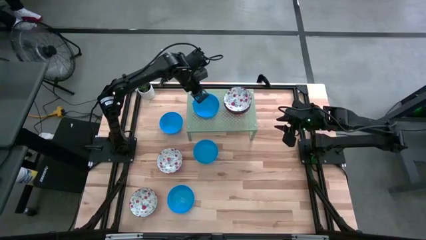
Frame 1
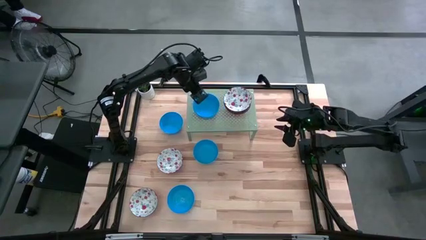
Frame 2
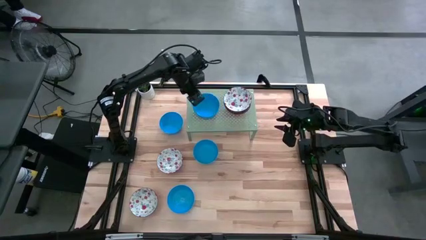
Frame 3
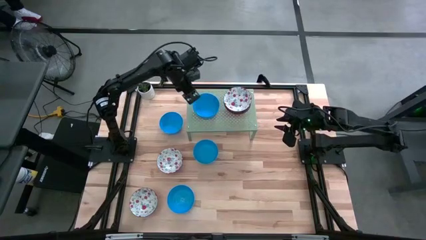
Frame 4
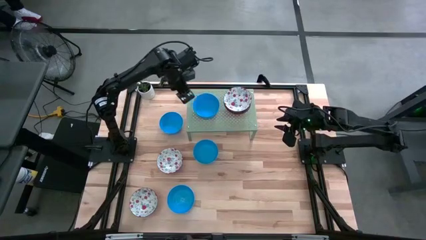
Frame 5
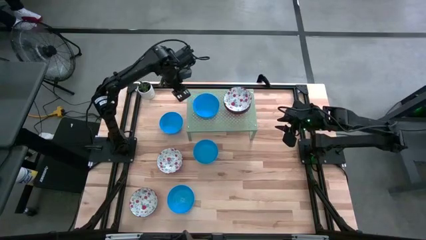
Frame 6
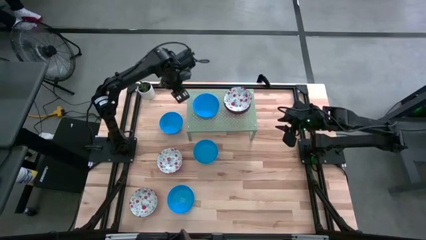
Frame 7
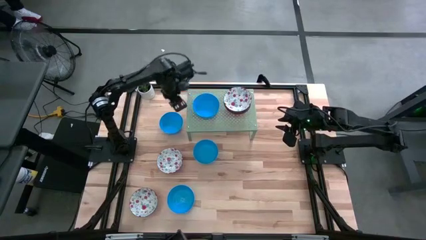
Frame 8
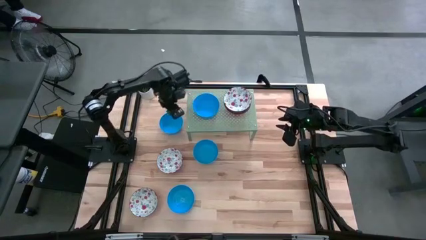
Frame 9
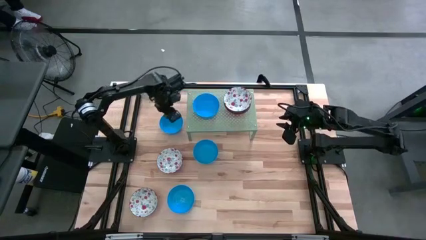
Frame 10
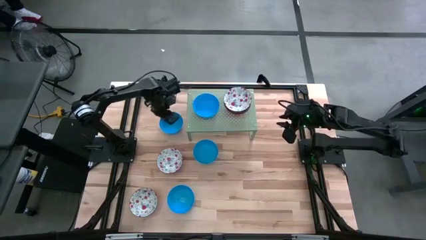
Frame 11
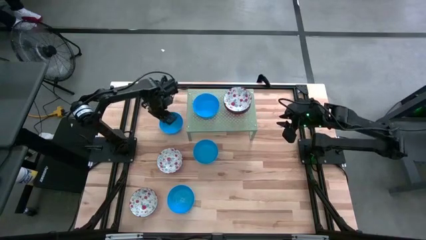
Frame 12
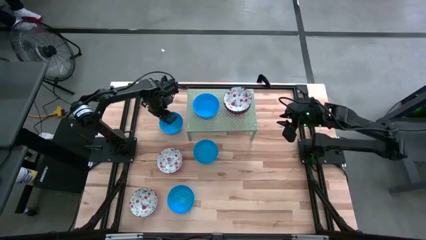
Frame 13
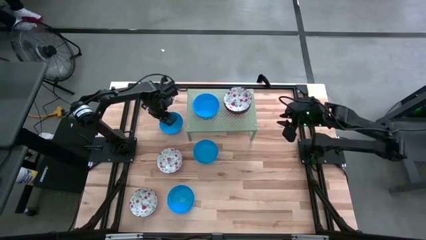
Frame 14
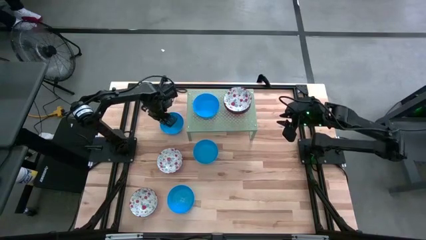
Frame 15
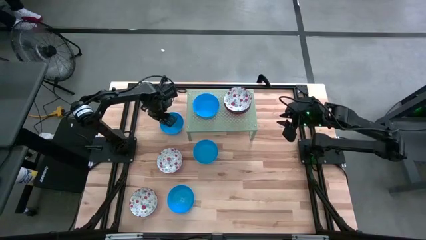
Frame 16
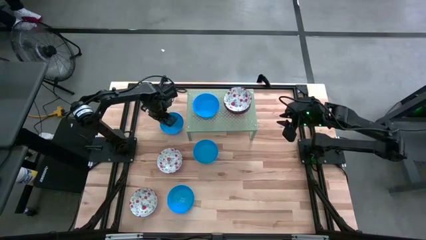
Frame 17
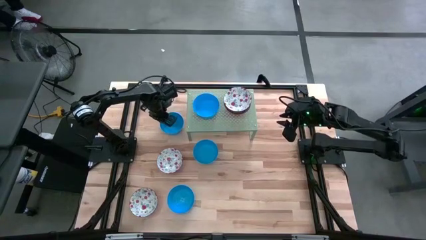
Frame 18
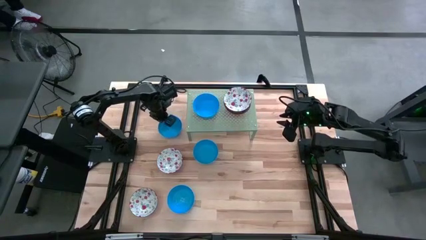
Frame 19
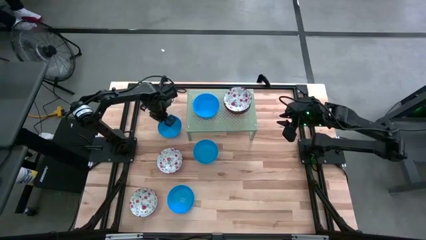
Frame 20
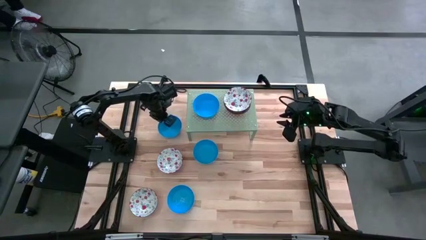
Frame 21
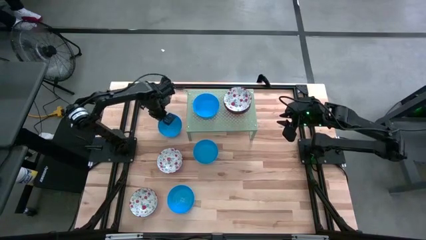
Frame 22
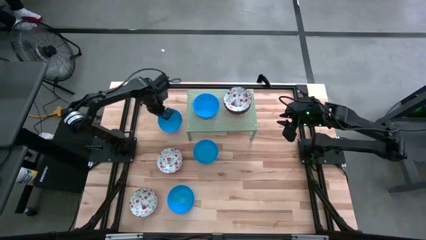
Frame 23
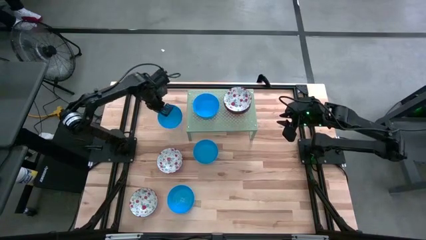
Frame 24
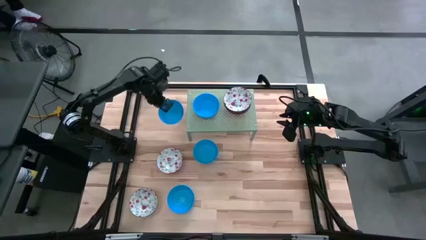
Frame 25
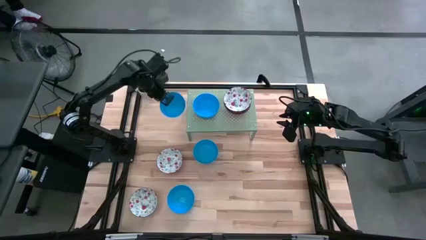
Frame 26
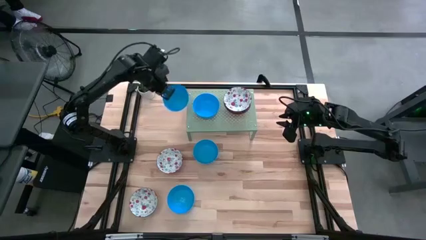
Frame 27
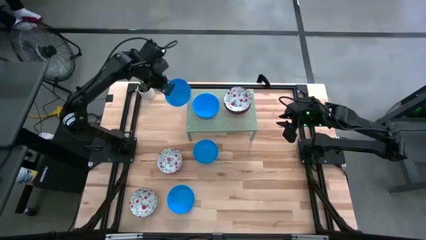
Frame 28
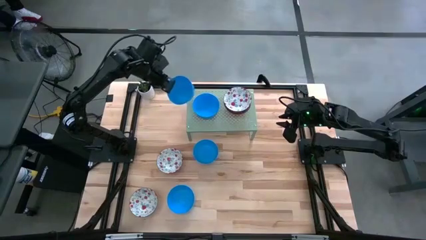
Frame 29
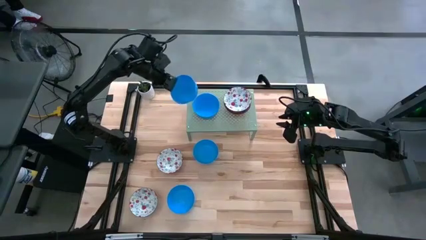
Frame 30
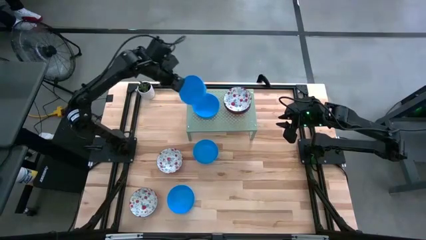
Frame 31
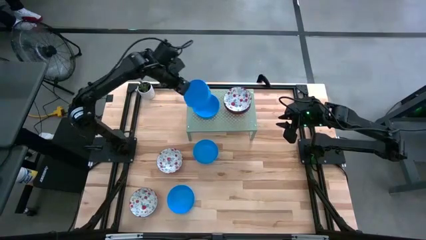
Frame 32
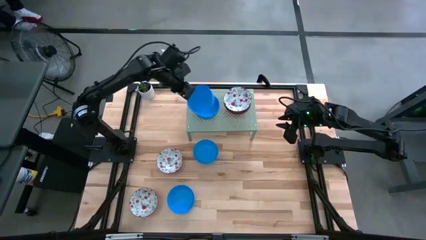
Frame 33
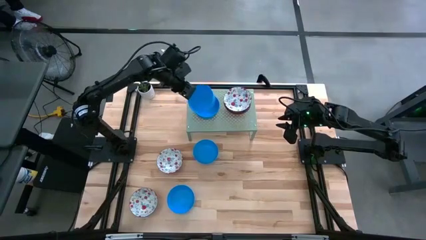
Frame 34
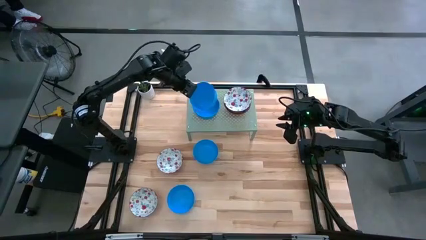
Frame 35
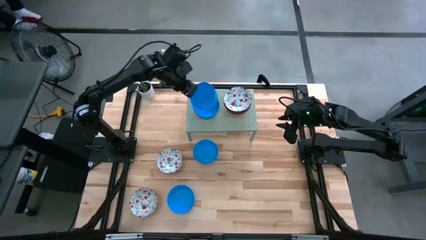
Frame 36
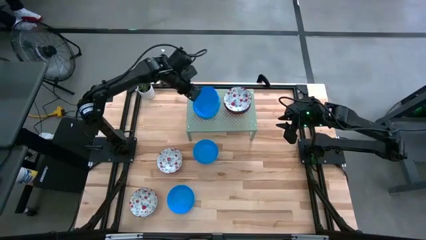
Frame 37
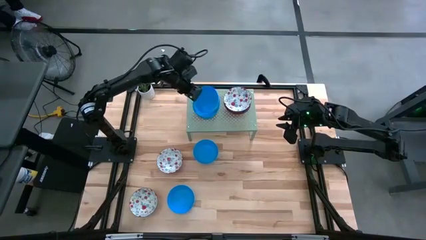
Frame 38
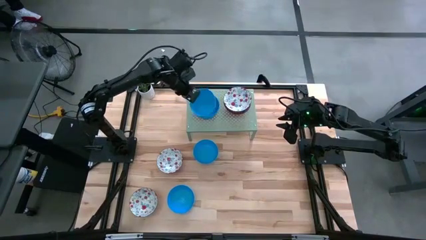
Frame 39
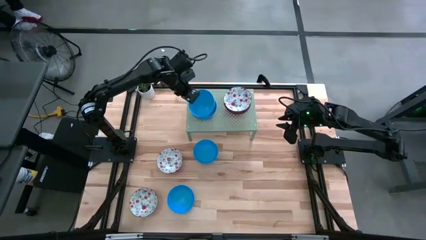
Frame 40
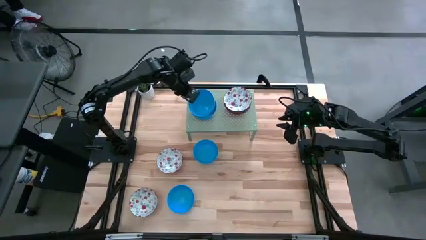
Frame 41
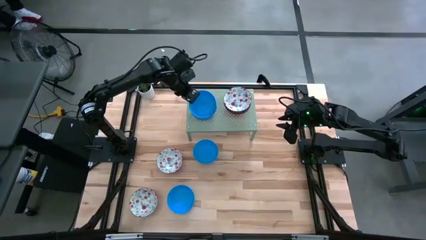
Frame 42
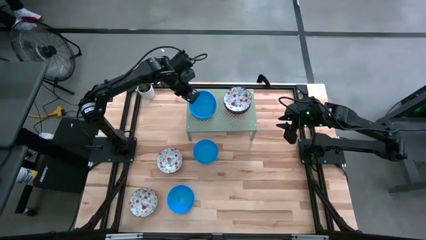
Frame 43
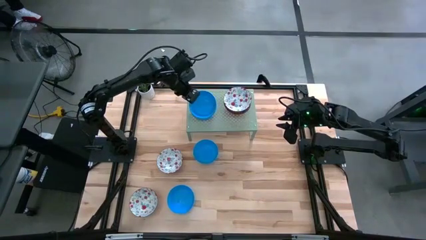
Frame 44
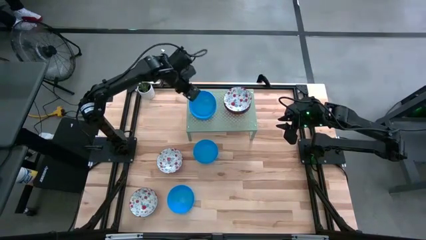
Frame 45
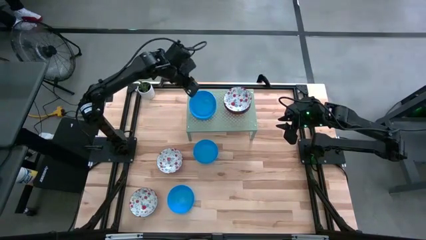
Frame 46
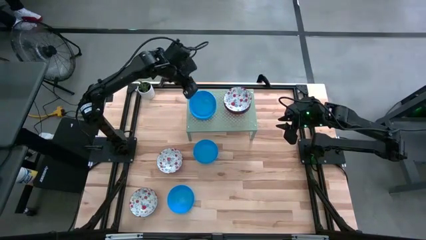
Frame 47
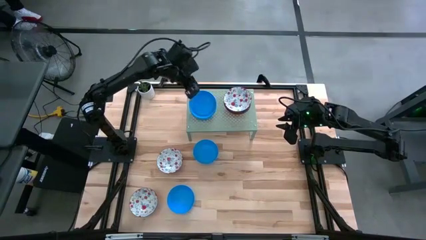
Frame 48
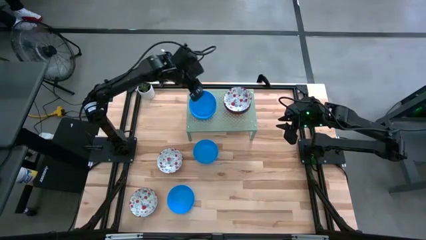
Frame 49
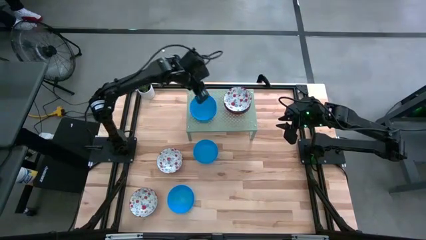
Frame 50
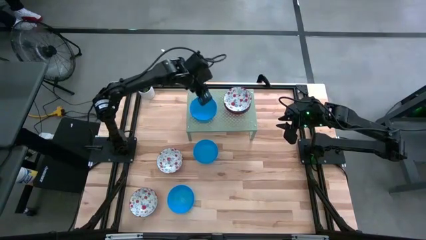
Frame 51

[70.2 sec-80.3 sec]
Task: Pick & Place Mini bowls
Stack the blue bowl on top of the blue bowls on the shelf

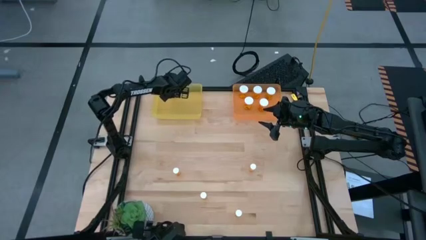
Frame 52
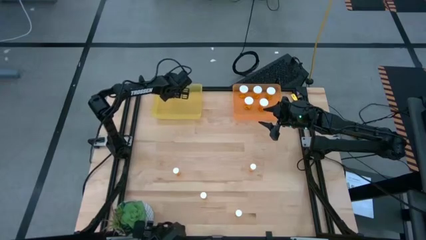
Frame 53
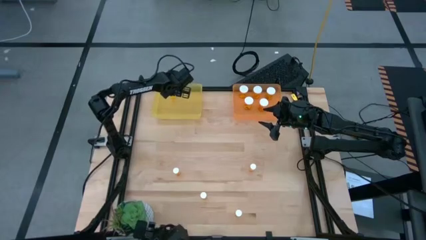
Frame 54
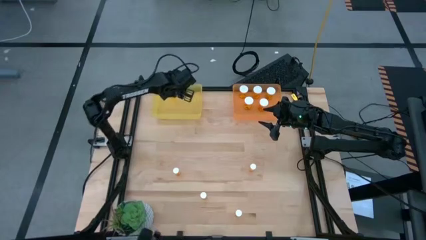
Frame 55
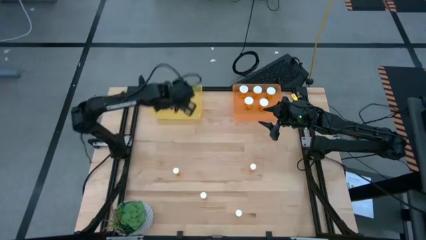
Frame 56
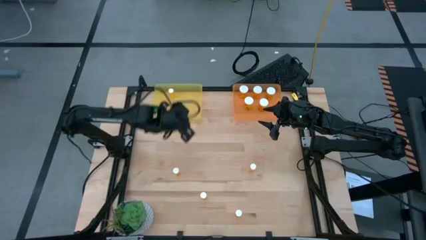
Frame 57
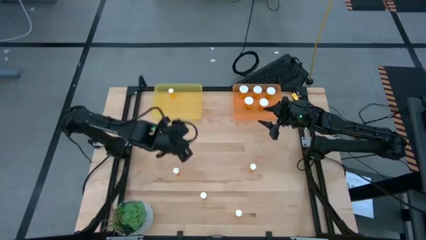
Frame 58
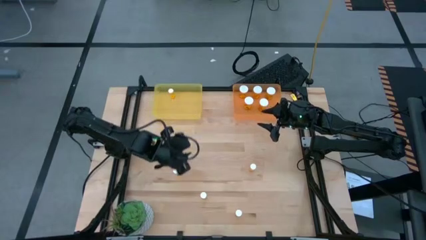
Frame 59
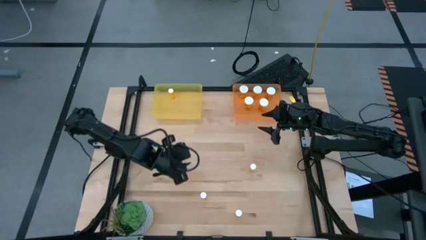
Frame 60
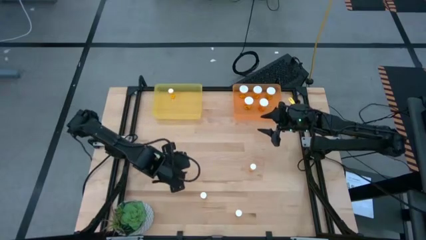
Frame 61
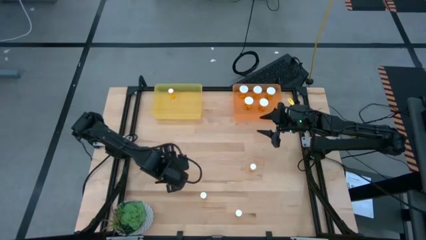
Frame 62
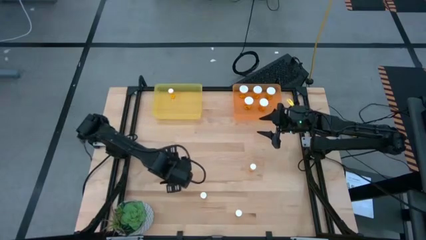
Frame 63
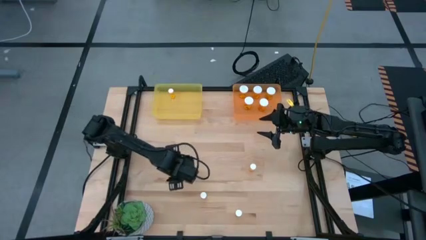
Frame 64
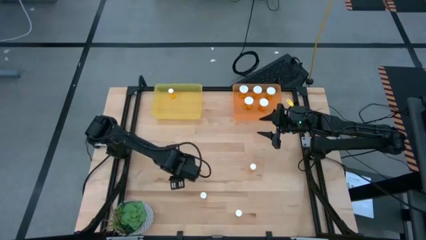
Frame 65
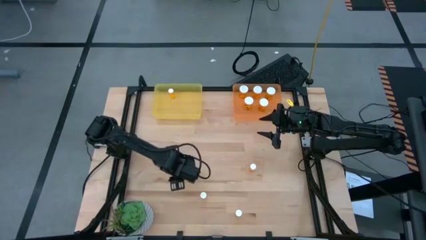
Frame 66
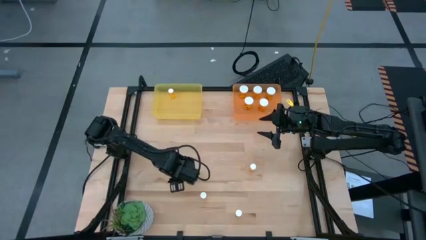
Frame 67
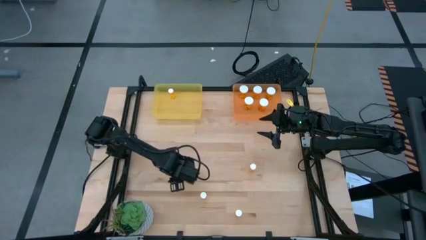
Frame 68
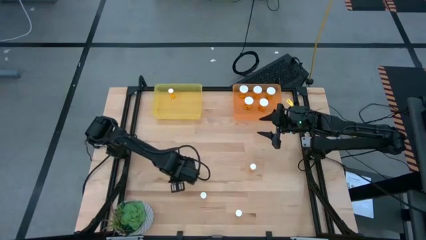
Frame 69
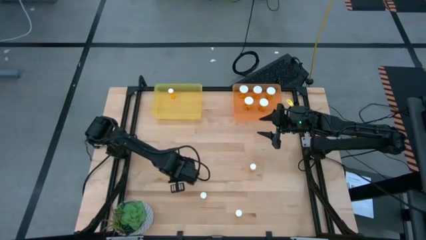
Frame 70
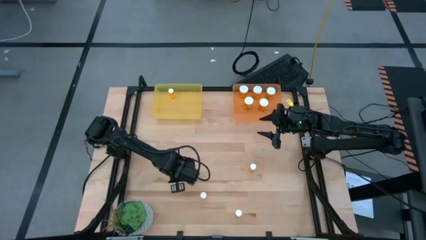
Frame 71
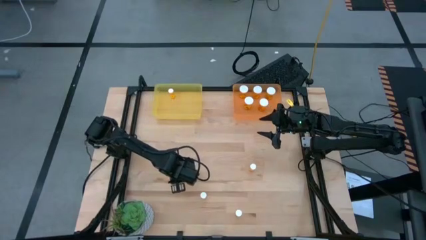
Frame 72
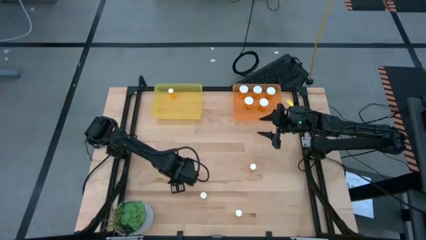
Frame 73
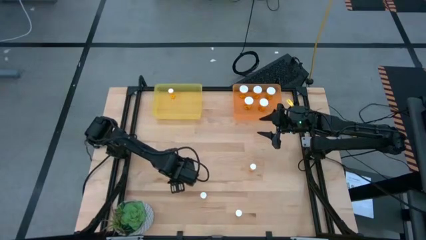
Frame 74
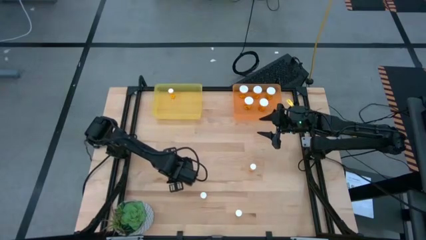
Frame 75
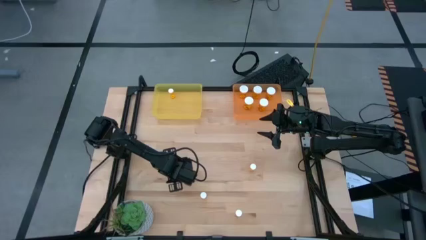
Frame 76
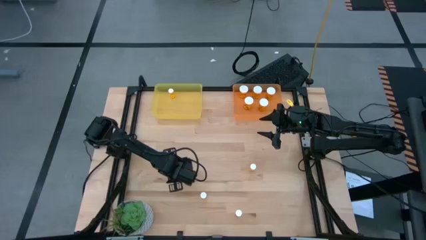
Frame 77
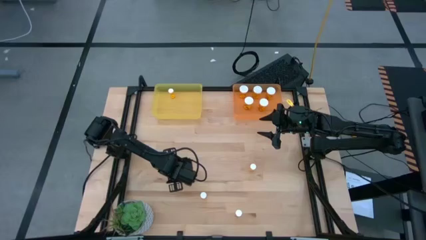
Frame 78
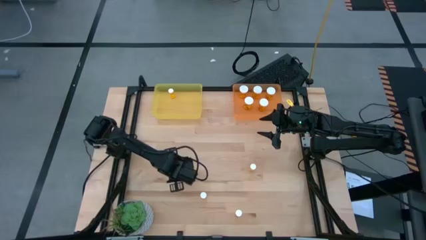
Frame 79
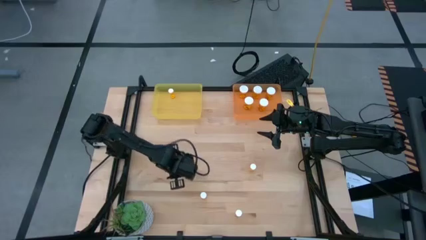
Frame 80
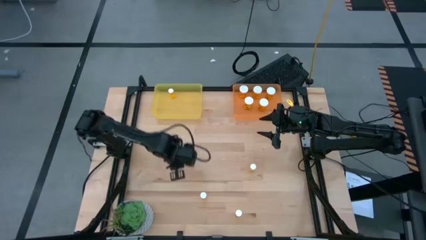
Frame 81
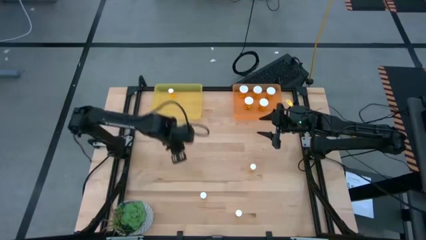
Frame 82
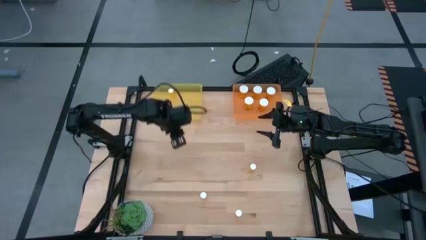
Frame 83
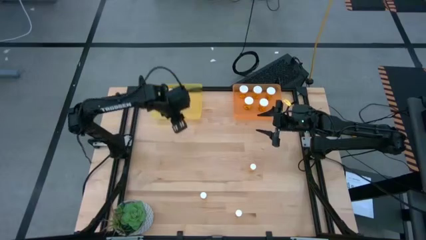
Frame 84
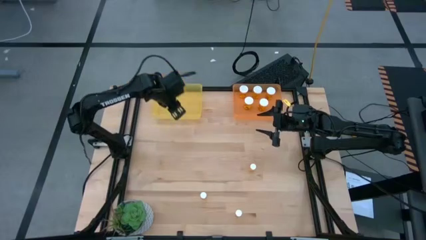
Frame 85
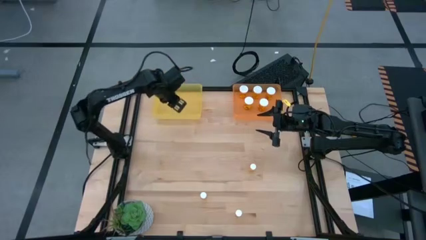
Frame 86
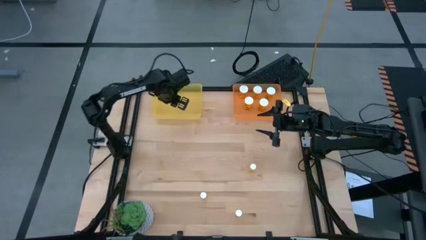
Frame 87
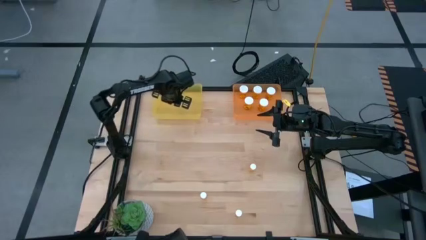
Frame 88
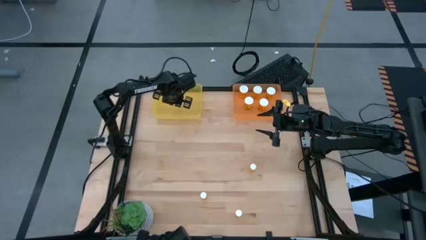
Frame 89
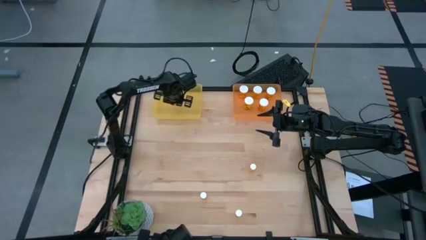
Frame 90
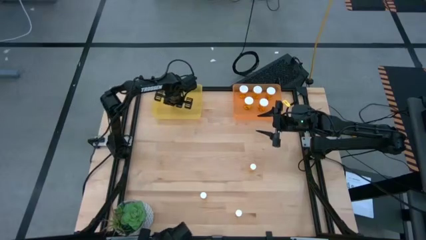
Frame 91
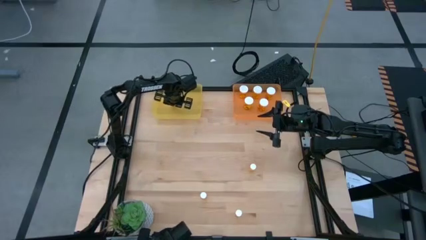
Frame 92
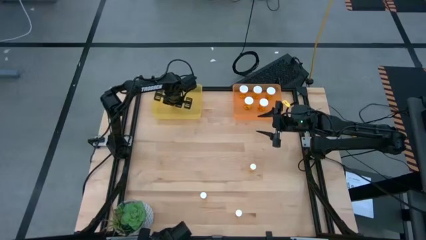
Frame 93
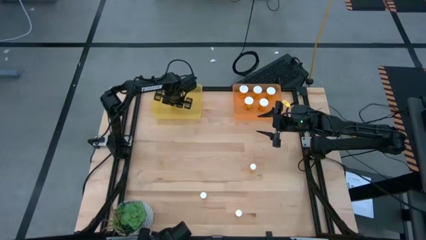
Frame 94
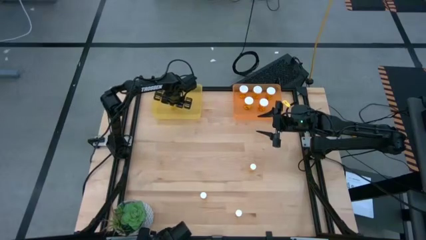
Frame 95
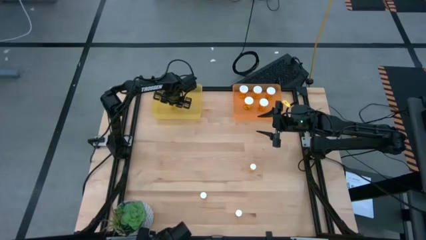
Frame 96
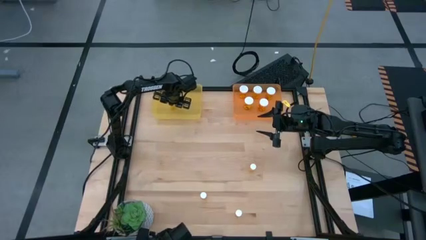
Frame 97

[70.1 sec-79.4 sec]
Task: Pick and place medicine bottles into bin by pill shape (circle, oval)
Put the small yellow pill bottle into the transparent yellow bin
